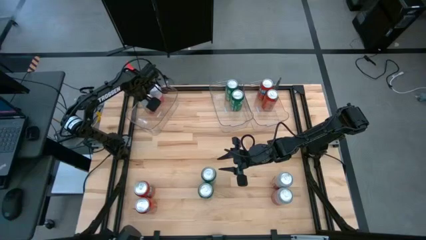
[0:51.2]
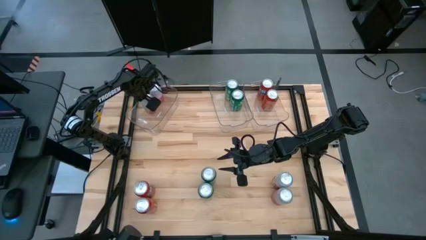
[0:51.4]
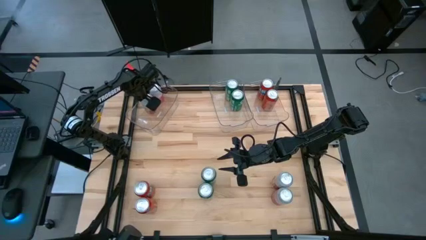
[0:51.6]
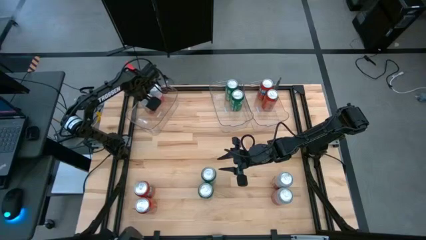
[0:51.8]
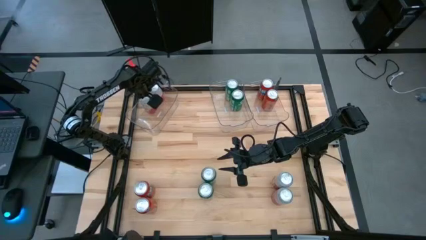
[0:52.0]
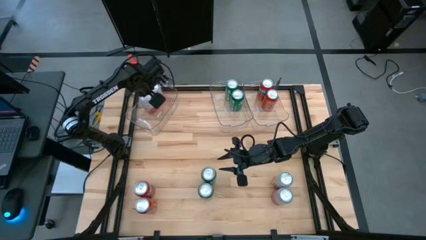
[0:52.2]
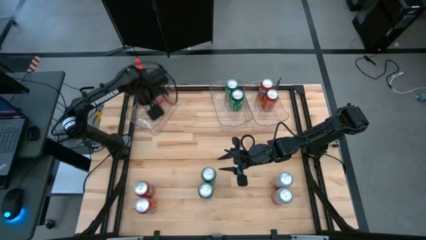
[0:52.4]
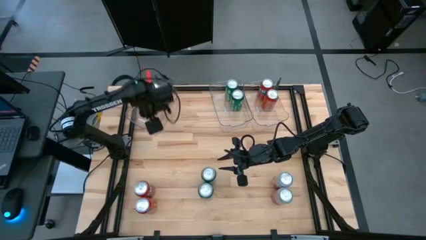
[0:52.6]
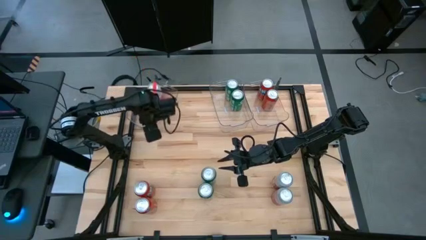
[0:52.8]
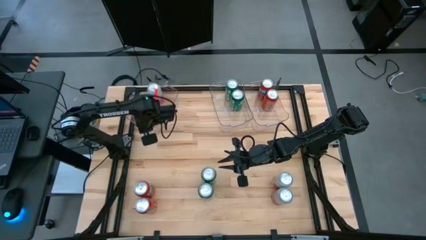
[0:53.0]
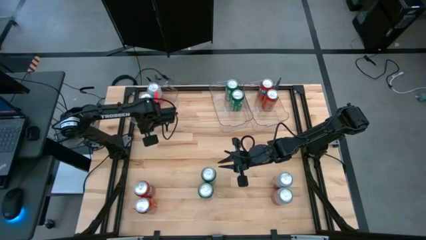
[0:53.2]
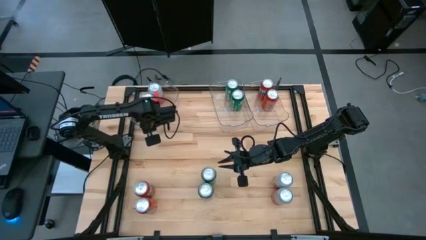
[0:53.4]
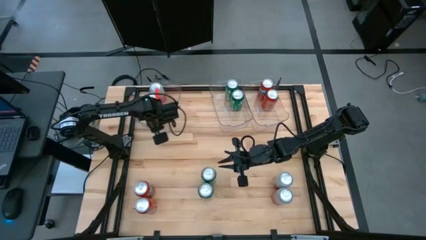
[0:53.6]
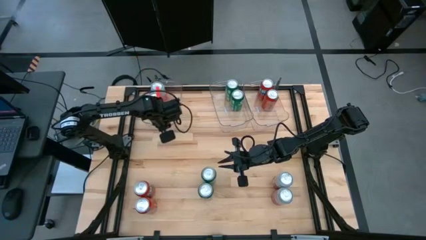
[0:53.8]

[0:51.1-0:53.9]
Task: Sort soda cans
Adjust the left transparent bin

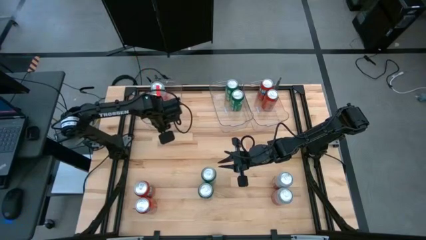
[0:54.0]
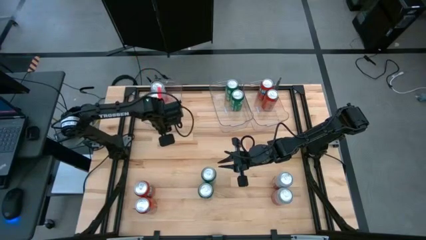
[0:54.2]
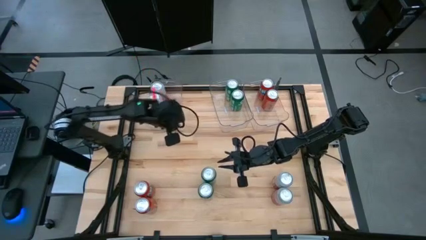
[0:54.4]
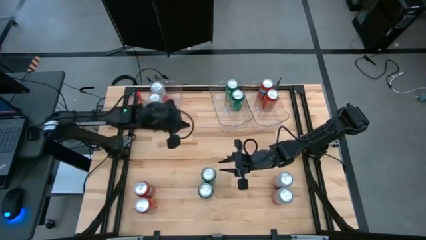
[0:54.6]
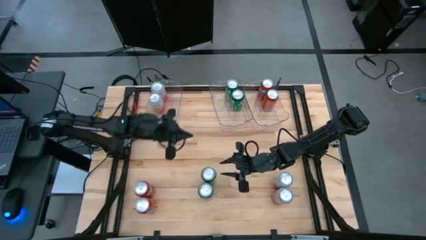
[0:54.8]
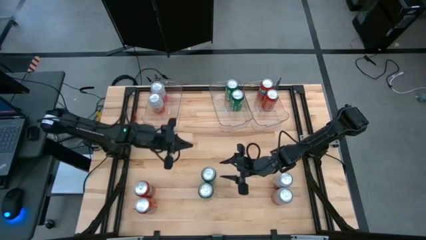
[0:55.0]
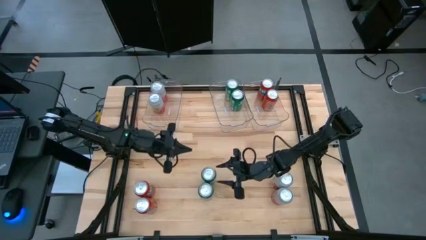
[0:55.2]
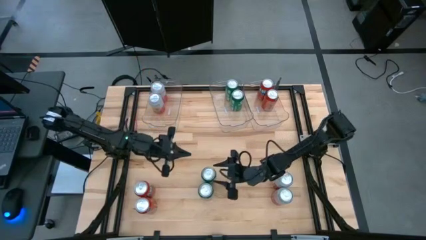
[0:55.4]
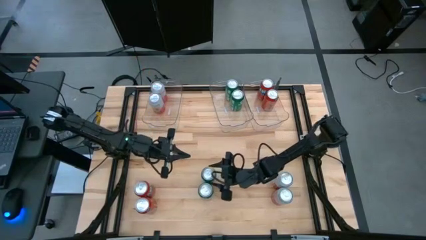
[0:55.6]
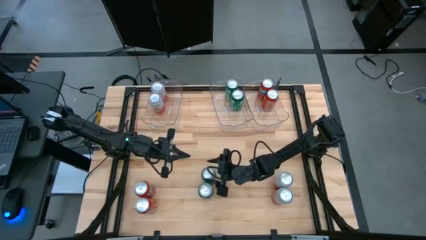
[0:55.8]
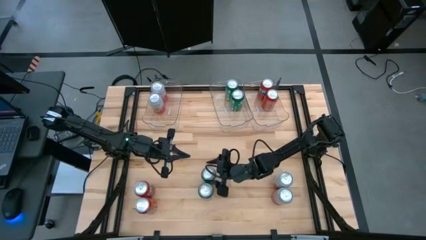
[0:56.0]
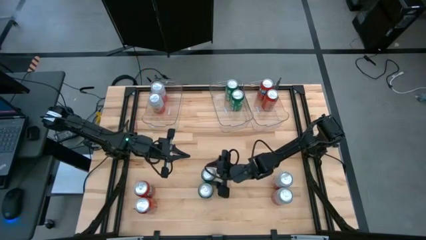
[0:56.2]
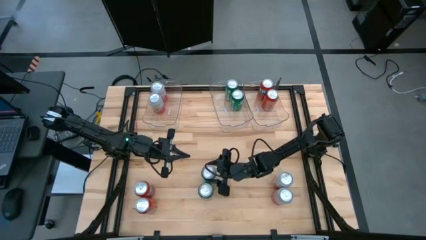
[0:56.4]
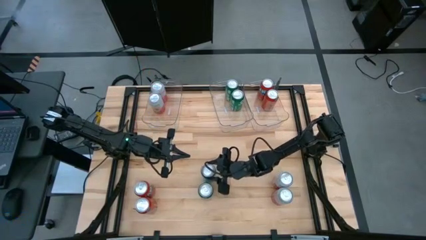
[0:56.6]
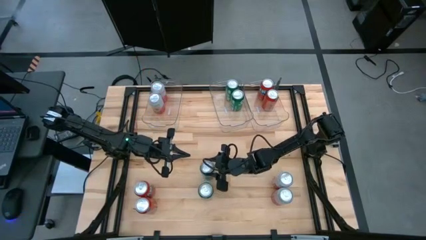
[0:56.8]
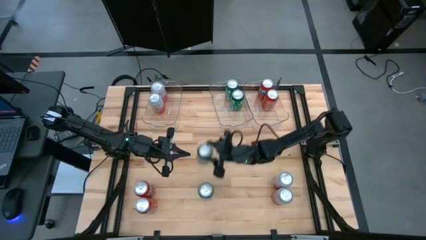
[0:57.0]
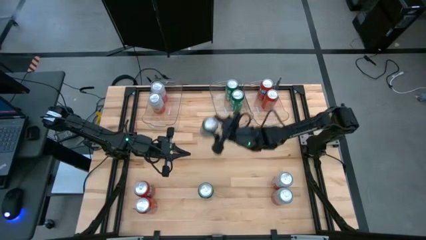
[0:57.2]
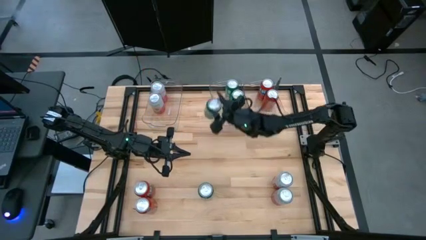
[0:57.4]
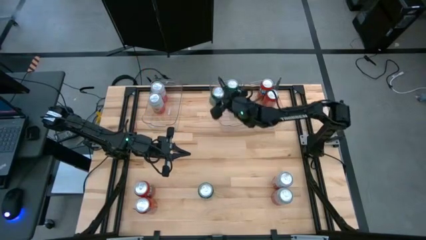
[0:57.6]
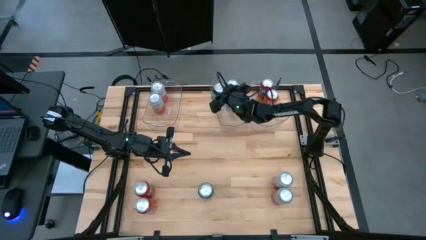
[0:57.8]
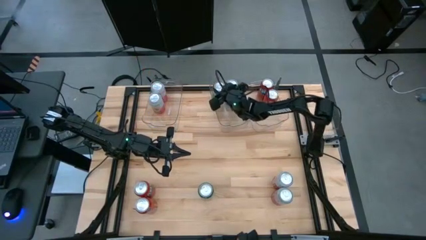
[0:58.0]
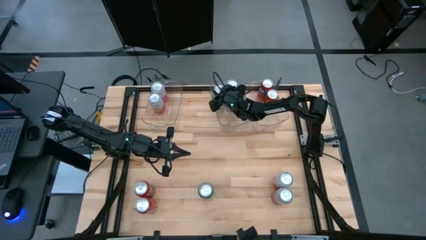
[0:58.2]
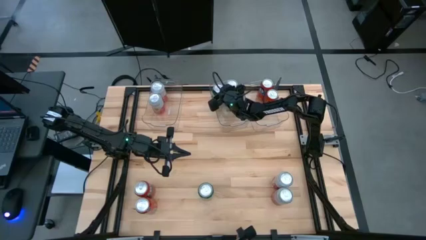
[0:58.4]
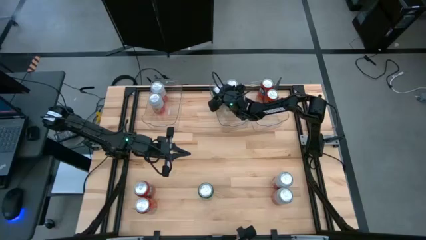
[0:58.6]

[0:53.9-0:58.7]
Put the top green soda can into the middle transparent bin

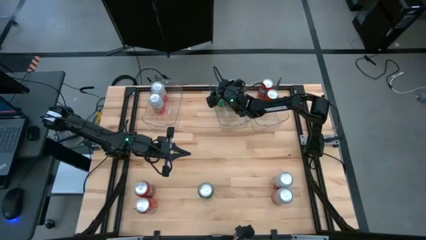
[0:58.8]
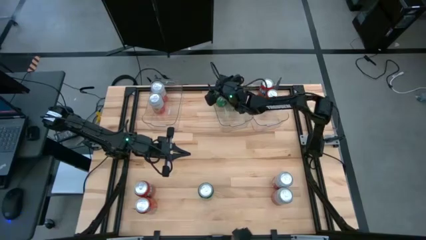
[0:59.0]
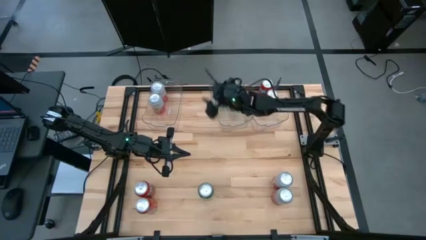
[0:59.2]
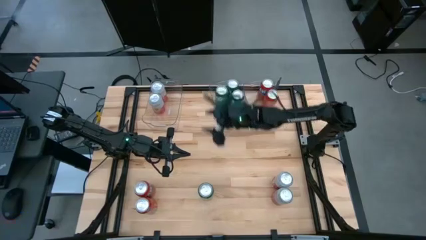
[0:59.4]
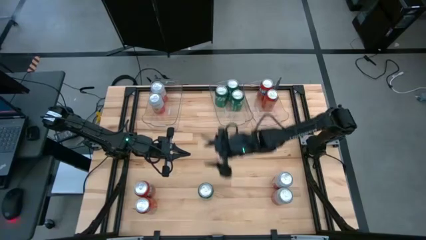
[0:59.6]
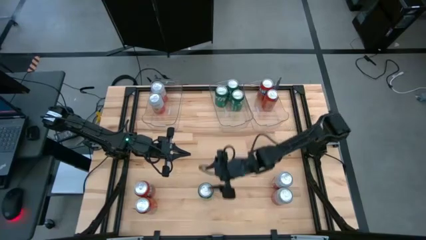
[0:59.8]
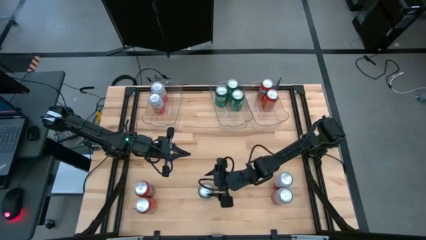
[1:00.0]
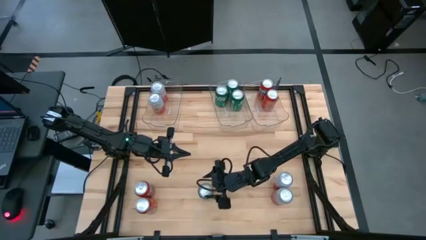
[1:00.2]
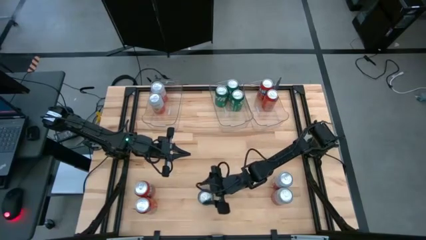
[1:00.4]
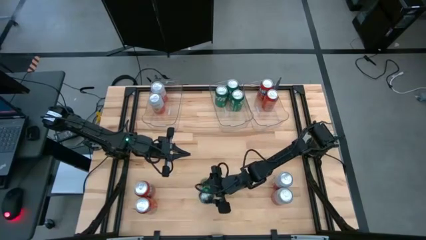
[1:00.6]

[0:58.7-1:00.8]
Put the green soda can into the middle transparent bin

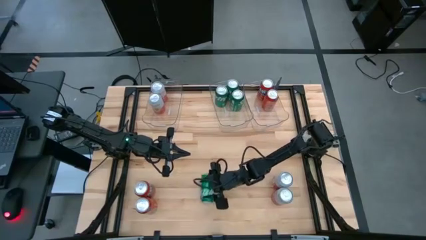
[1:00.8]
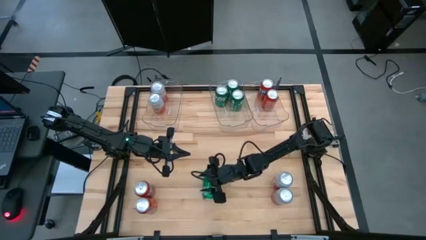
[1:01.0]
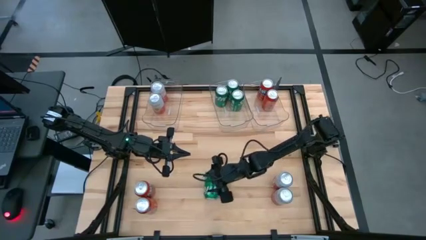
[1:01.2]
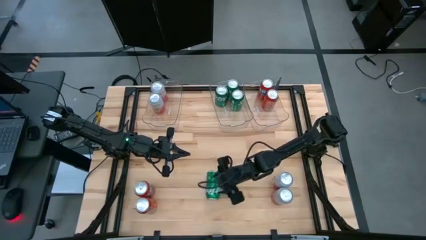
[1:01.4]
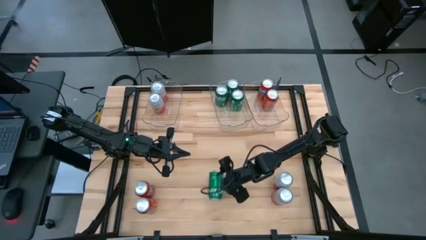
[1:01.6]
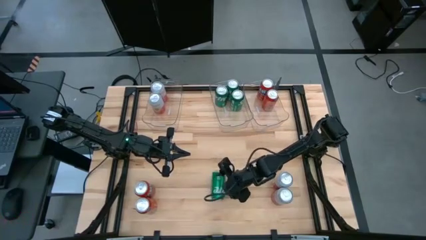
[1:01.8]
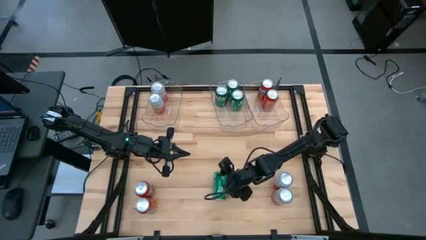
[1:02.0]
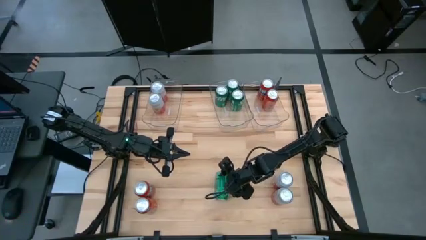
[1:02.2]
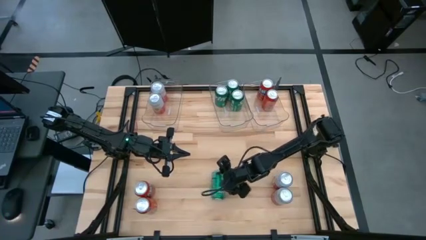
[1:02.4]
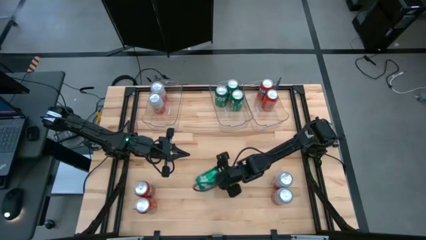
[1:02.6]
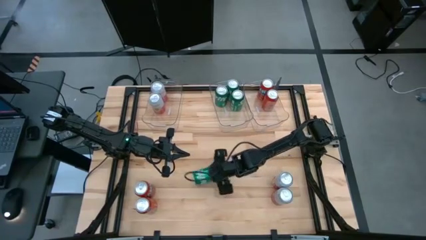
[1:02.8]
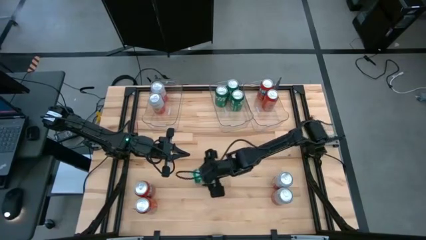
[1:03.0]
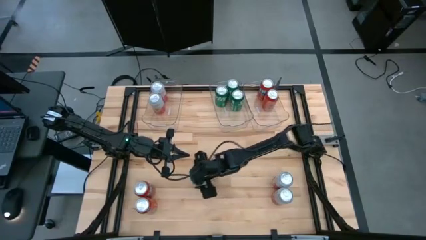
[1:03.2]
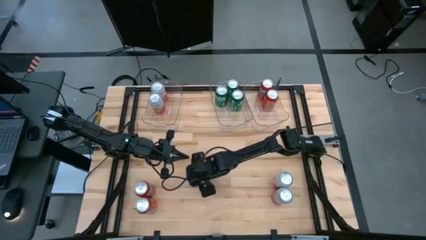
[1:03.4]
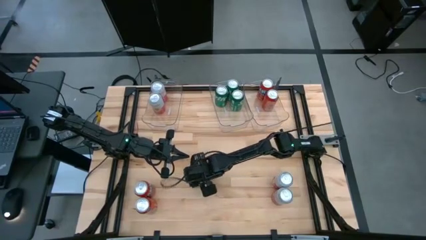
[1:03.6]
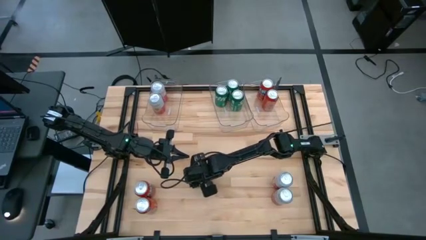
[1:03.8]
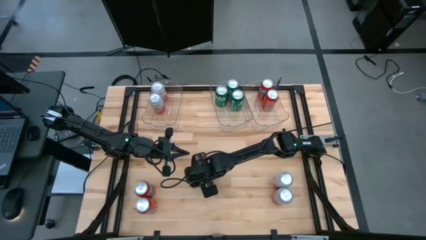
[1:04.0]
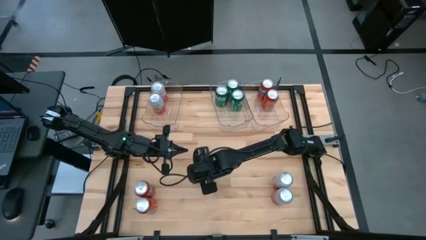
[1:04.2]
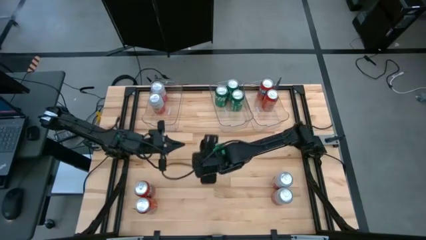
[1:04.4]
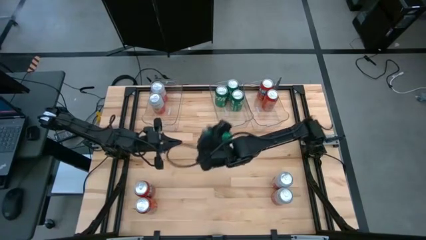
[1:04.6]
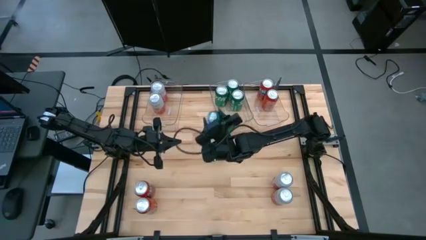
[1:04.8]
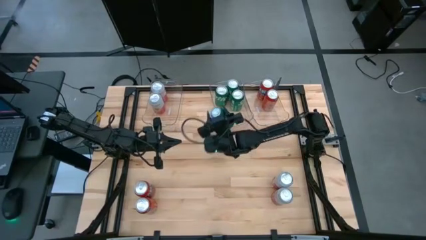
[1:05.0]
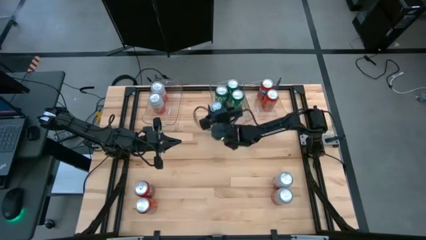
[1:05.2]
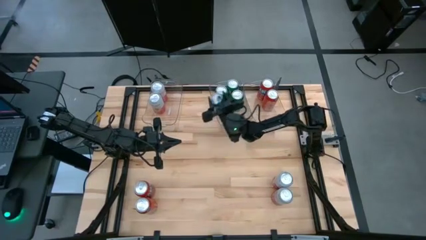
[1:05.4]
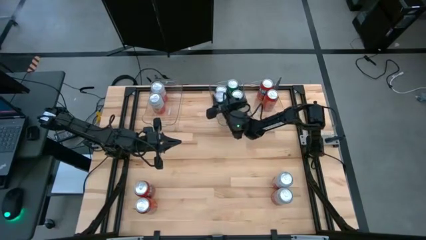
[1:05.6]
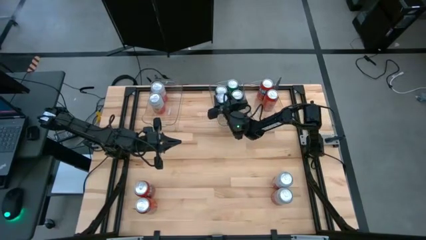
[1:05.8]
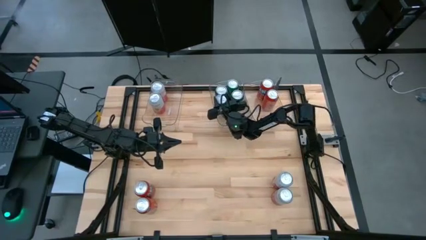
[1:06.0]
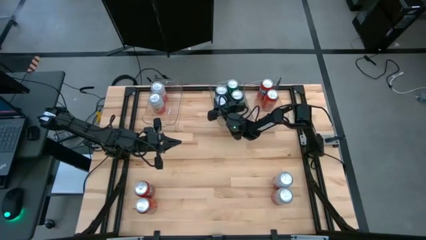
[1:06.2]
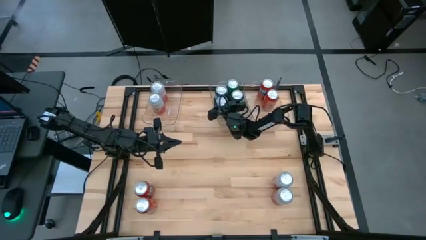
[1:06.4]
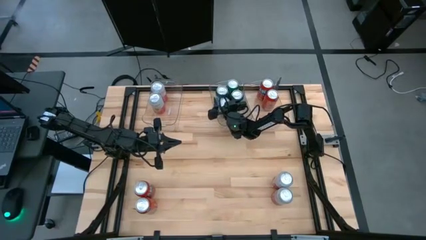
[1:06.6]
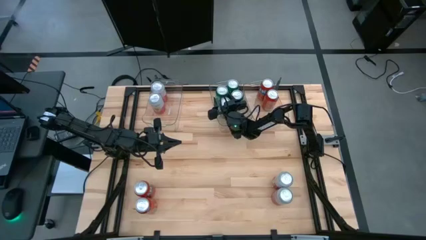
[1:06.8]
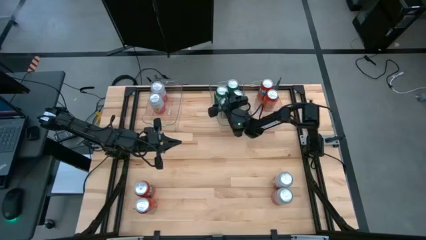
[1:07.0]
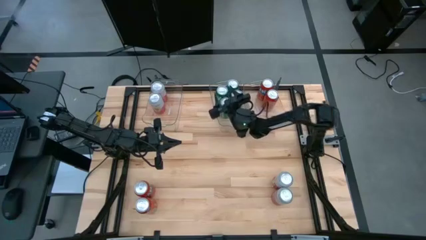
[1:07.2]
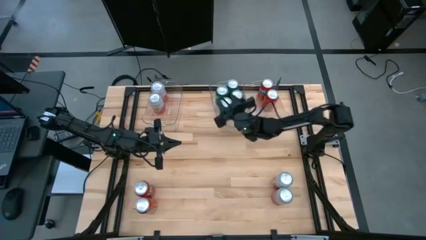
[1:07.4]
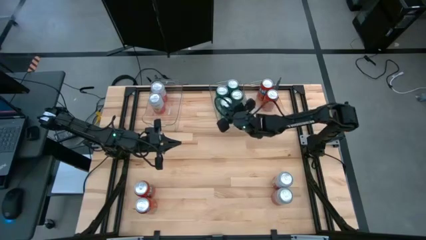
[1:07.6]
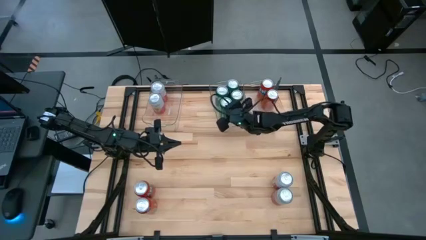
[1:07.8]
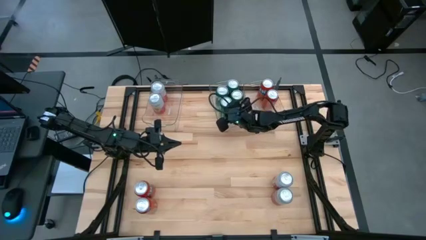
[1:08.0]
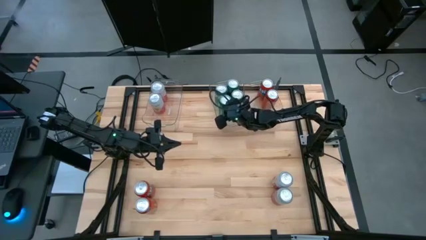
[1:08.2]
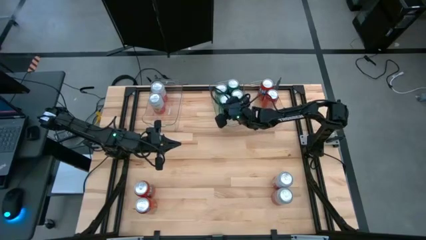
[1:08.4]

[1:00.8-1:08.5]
Put the green soda can into the middle transparent bin
